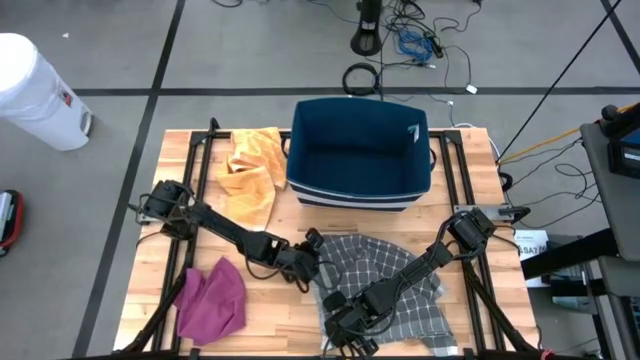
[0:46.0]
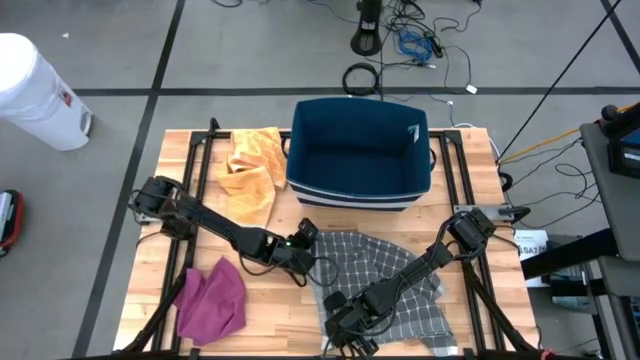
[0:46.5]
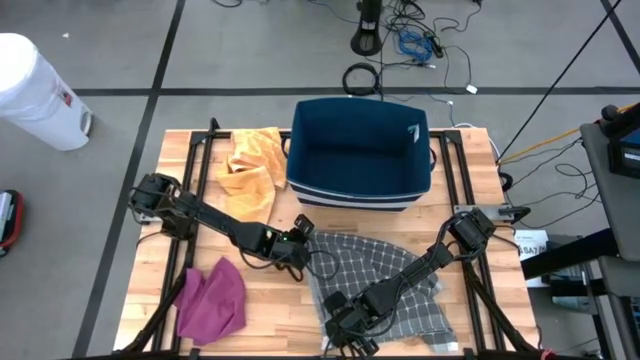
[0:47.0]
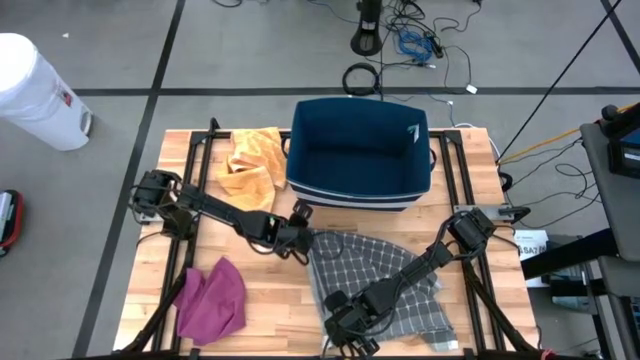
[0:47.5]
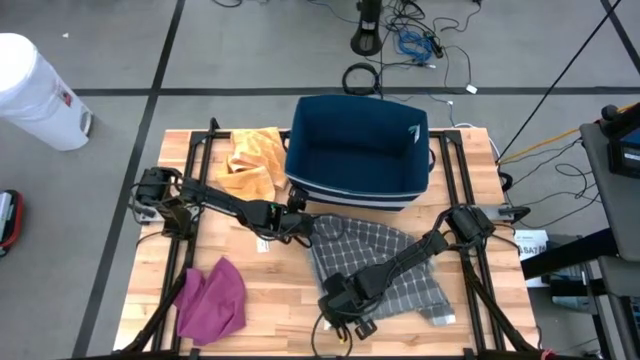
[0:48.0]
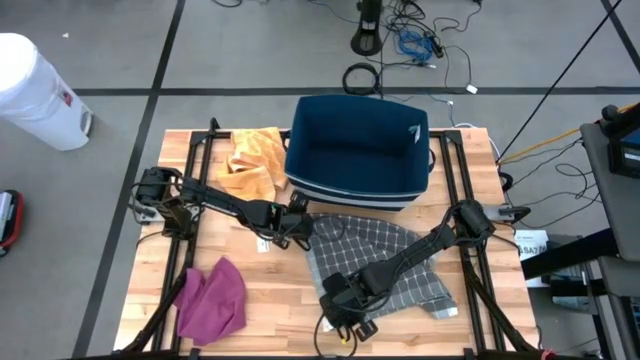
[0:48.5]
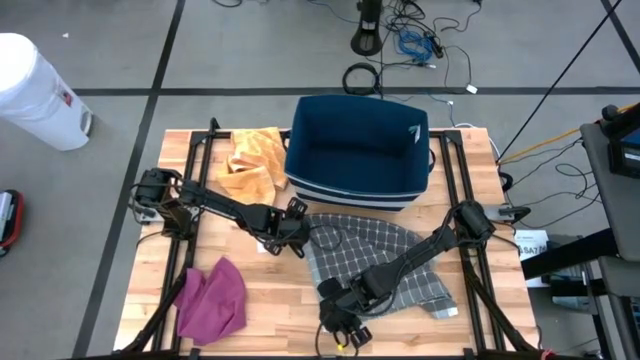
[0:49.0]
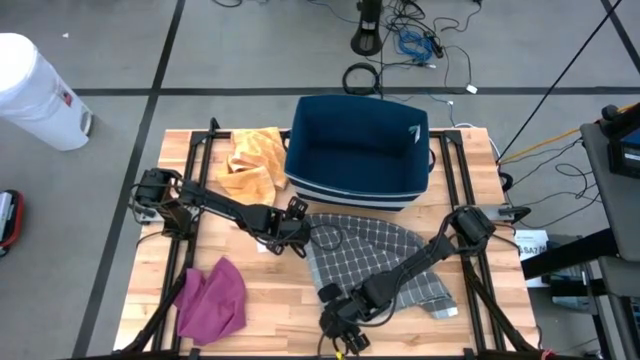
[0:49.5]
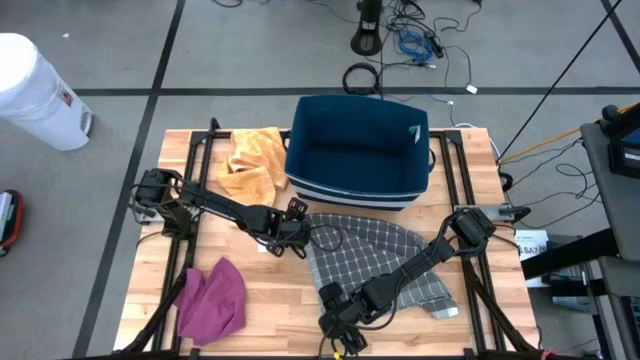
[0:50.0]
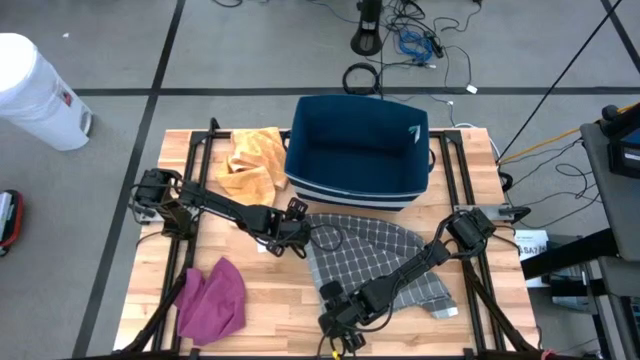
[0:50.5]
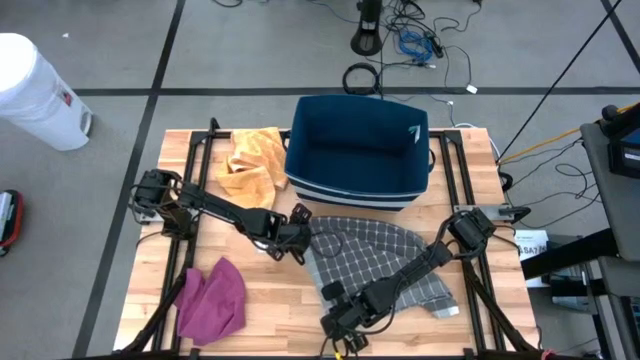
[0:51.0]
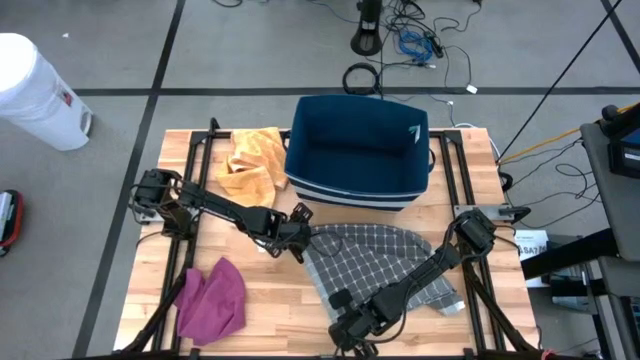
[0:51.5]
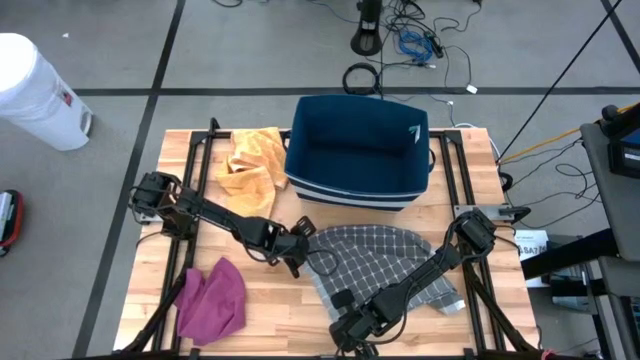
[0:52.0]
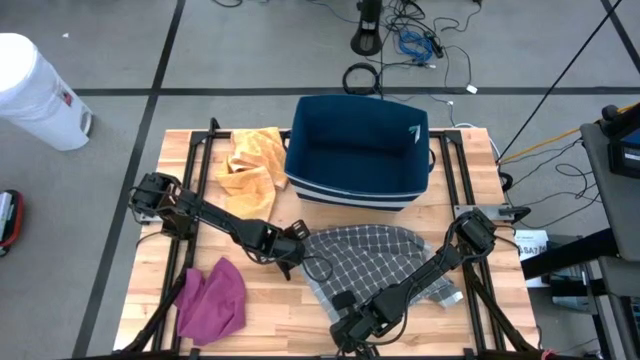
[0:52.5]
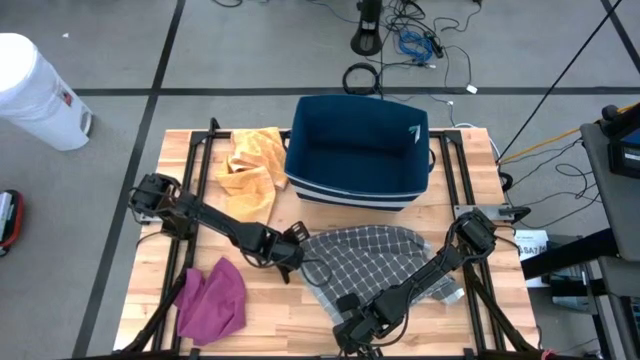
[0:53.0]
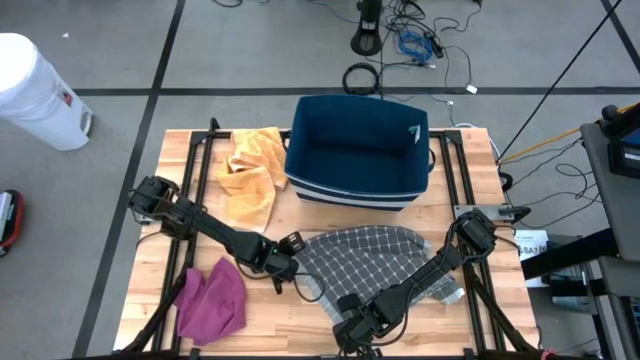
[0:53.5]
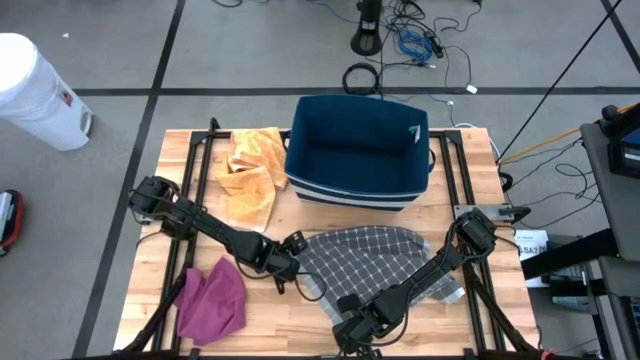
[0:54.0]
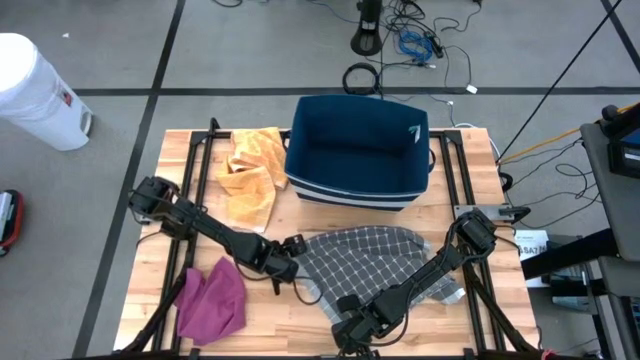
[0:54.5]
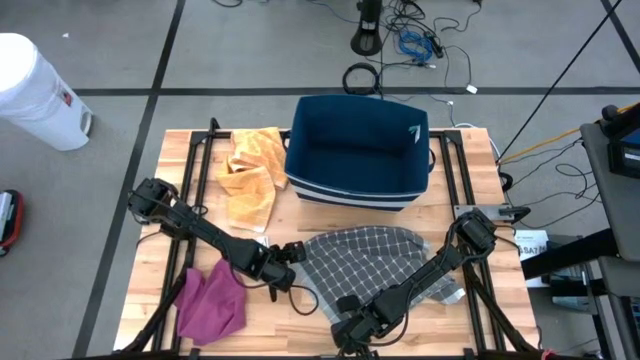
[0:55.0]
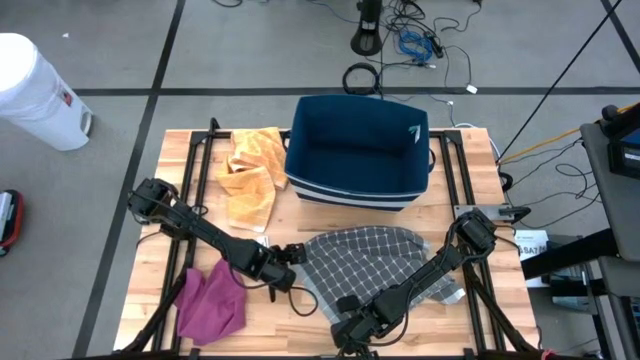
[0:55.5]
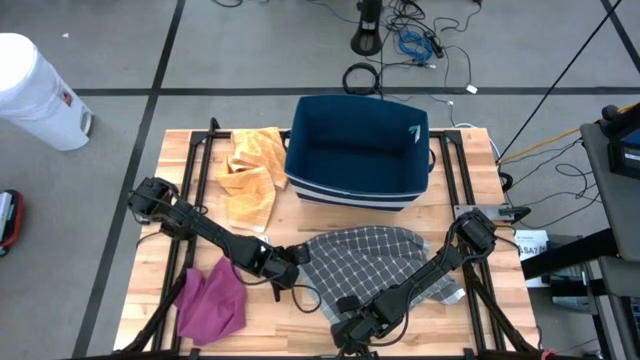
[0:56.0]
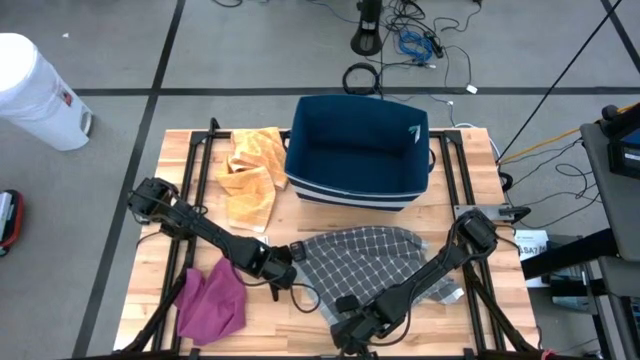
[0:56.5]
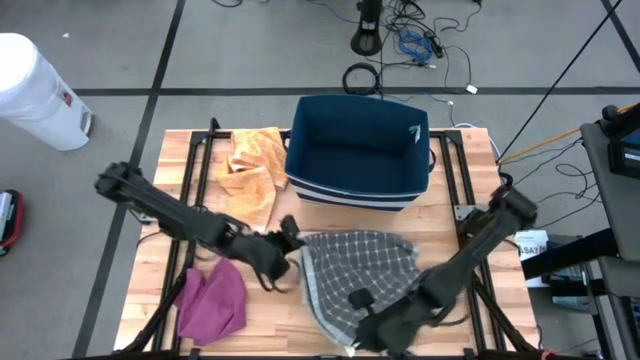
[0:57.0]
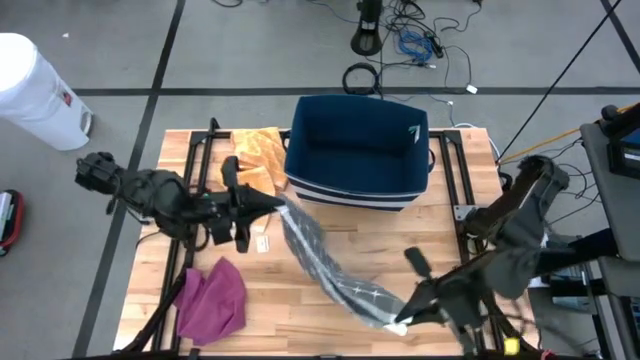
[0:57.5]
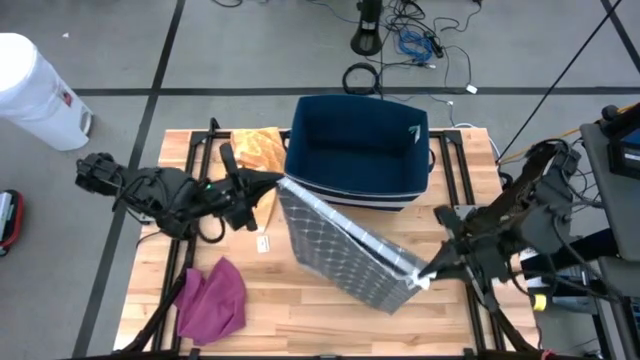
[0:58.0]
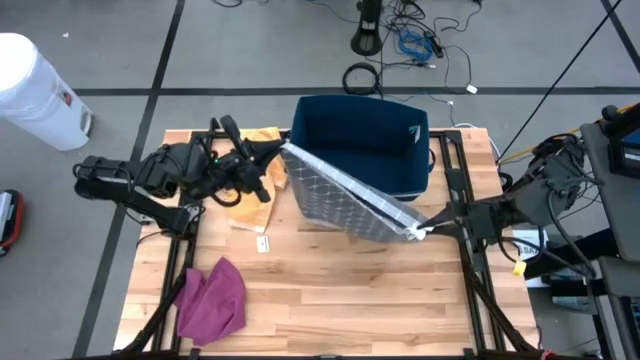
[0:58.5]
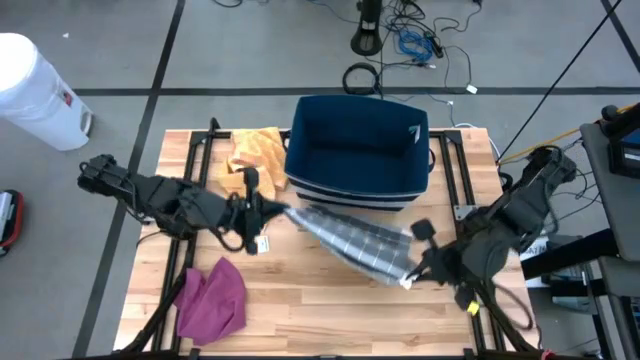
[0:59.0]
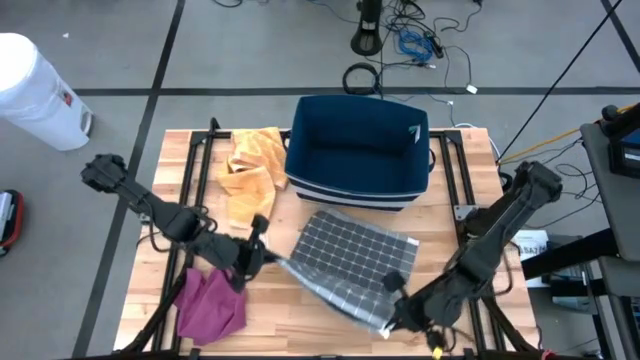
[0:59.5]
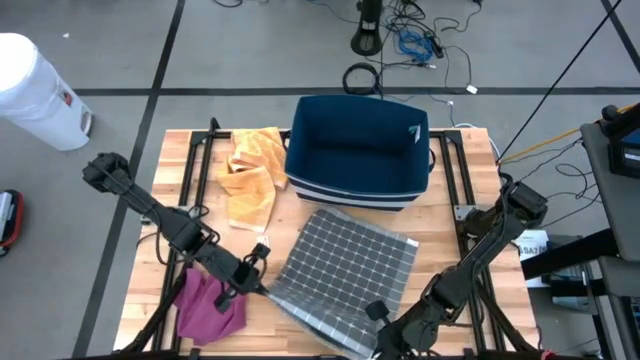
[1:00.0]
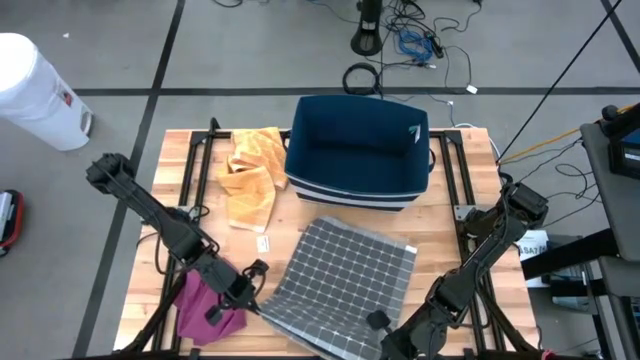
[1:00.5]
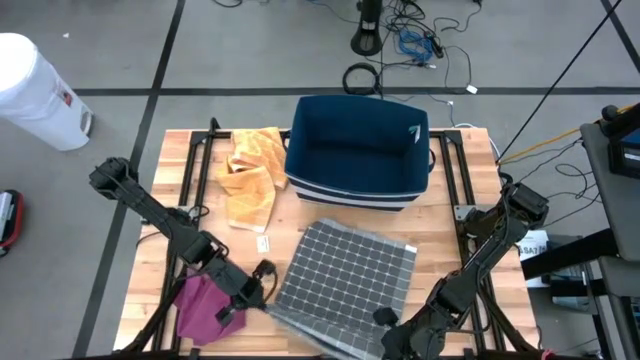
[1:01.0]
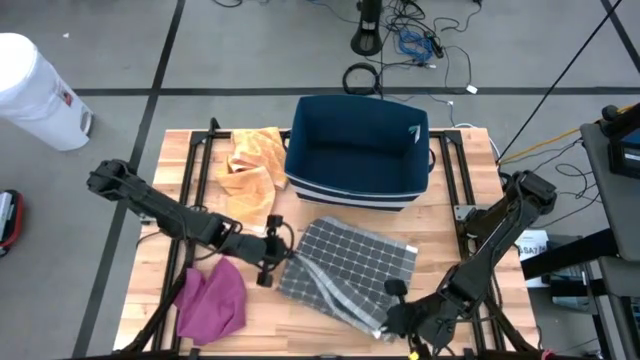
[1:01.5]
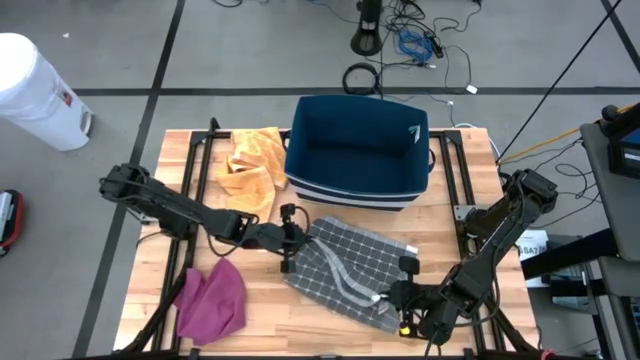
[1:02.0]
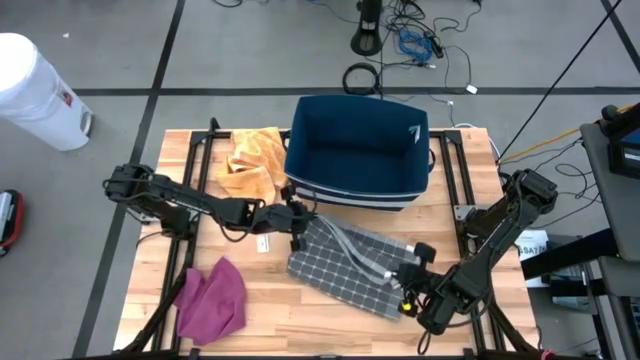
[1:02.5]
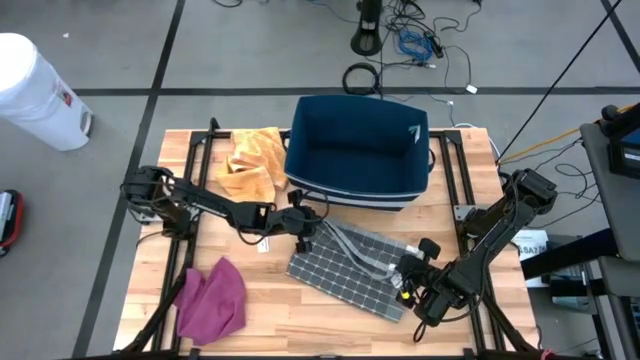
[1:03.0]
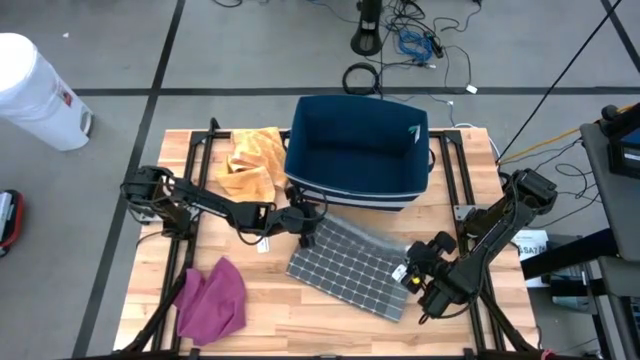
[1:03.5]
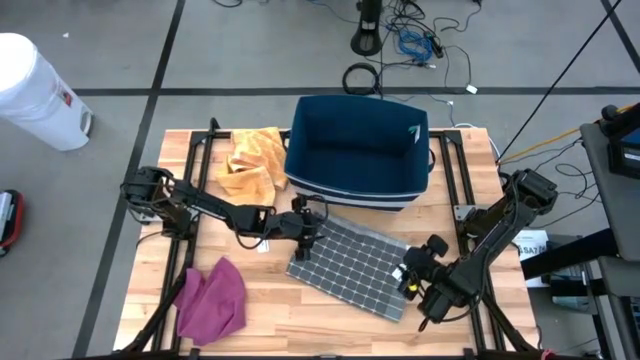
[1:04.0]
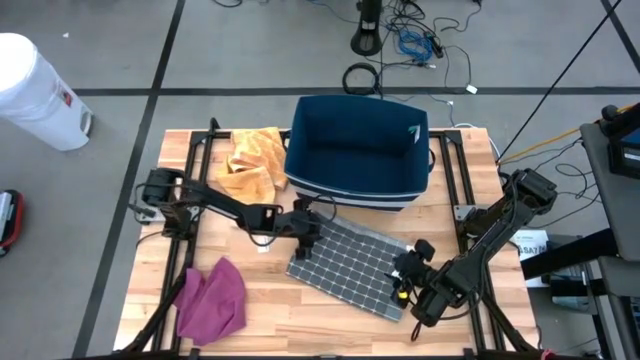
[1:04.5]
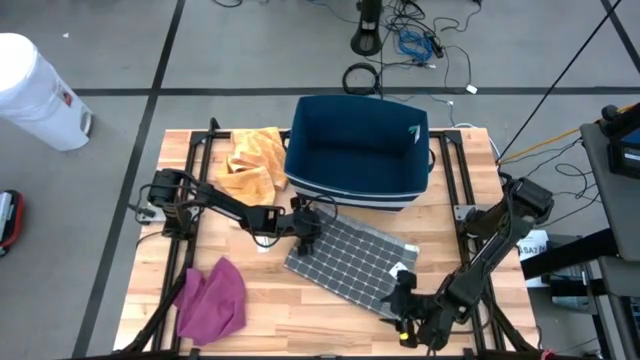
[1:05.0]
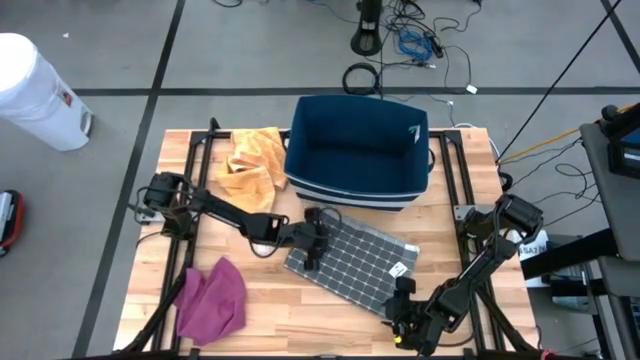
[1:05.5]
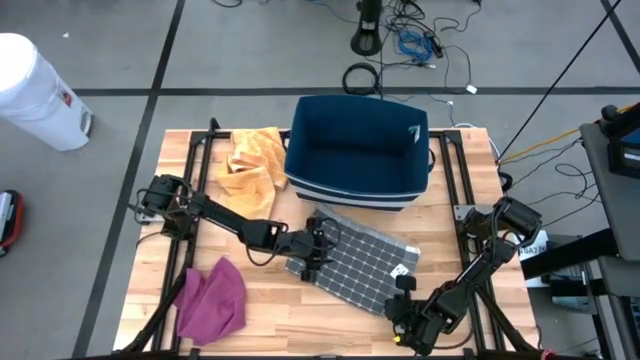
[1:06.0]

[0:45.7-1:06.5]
Task: Fold towel
Fold the gray patterned towel
